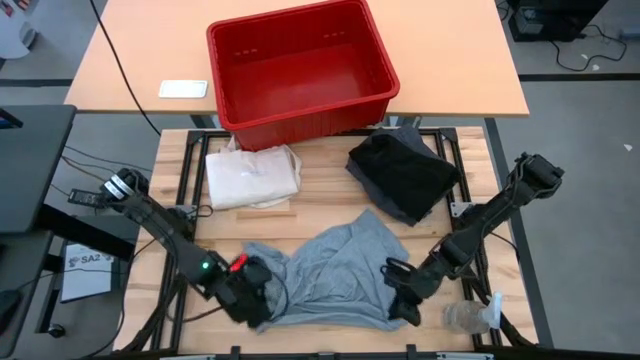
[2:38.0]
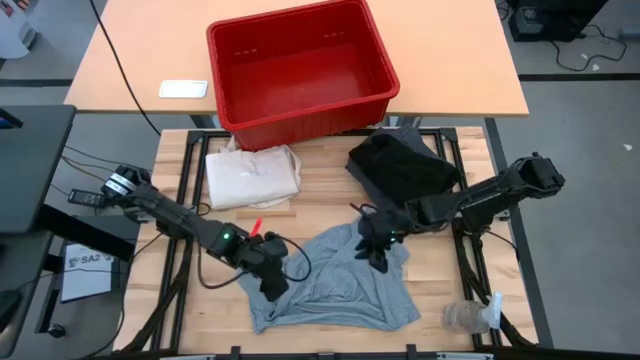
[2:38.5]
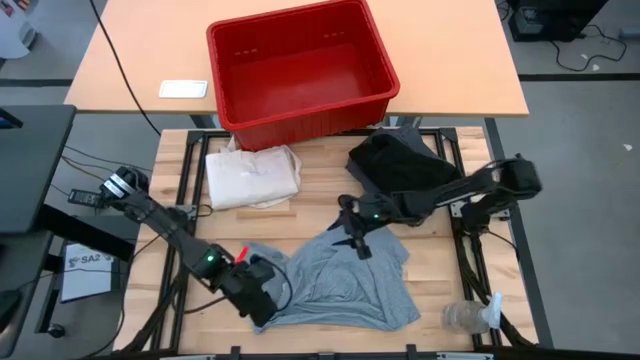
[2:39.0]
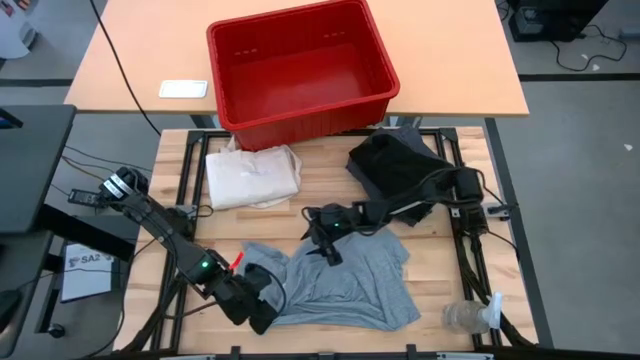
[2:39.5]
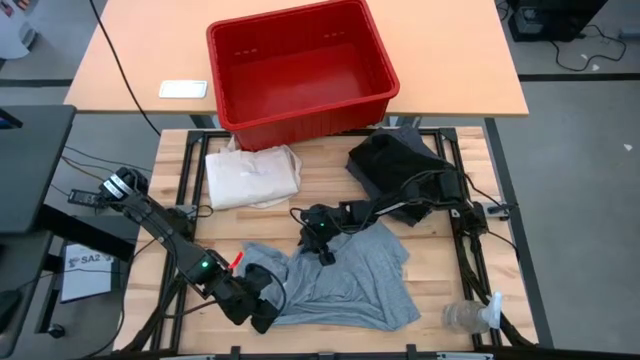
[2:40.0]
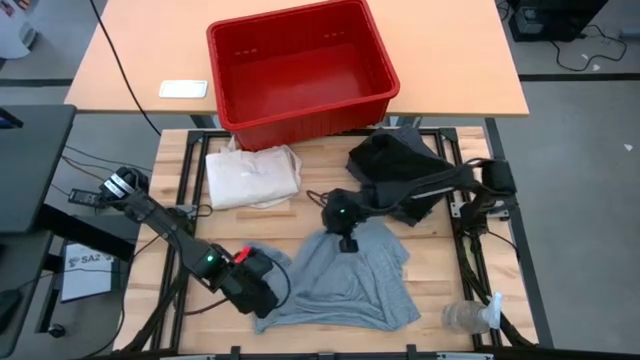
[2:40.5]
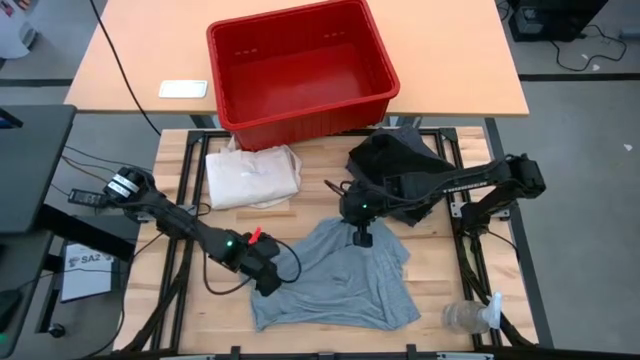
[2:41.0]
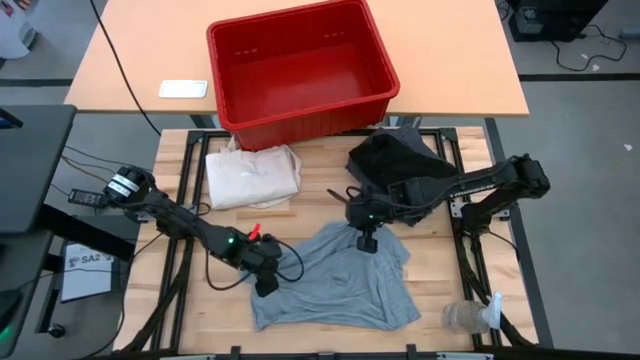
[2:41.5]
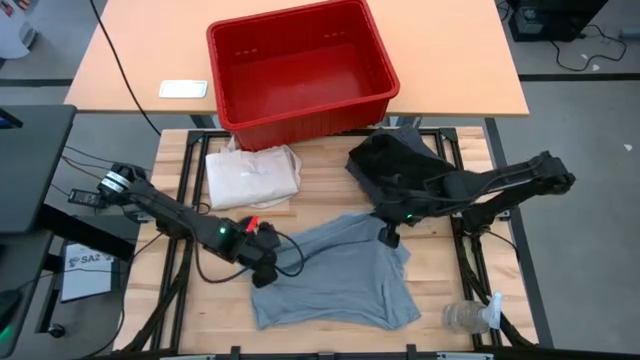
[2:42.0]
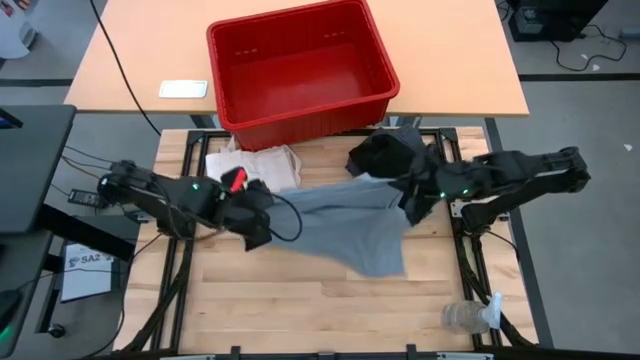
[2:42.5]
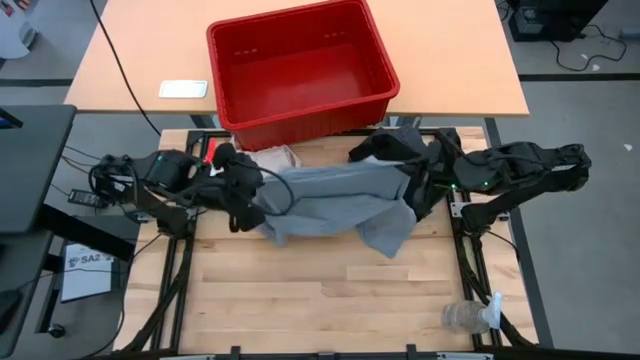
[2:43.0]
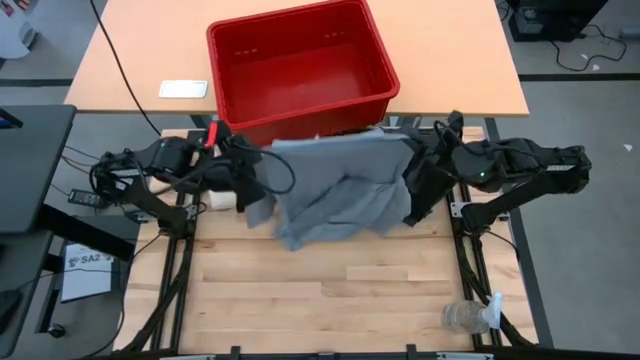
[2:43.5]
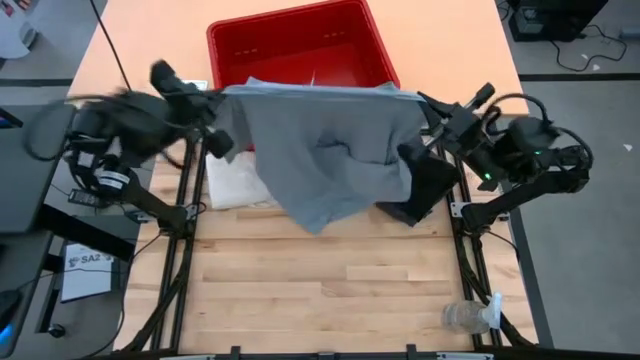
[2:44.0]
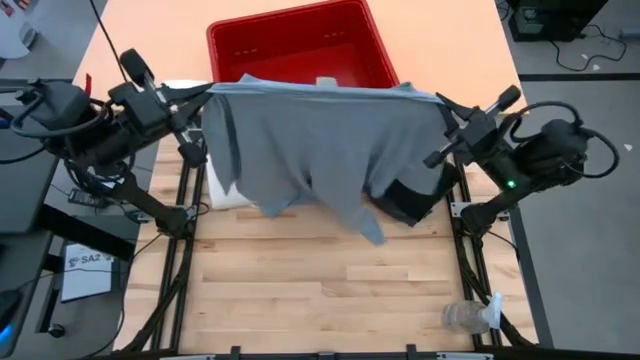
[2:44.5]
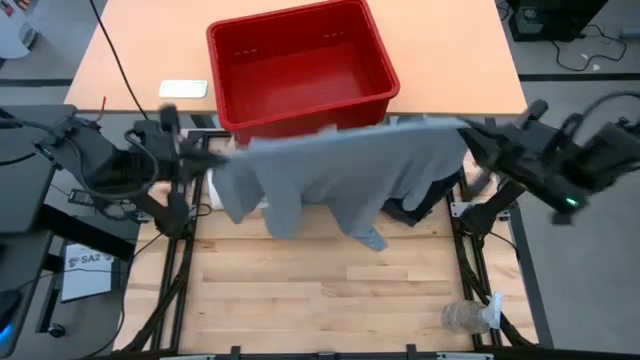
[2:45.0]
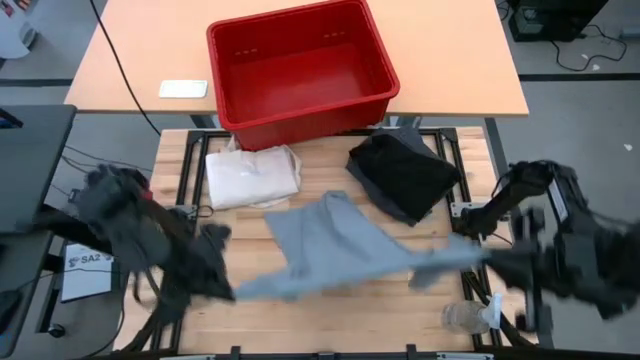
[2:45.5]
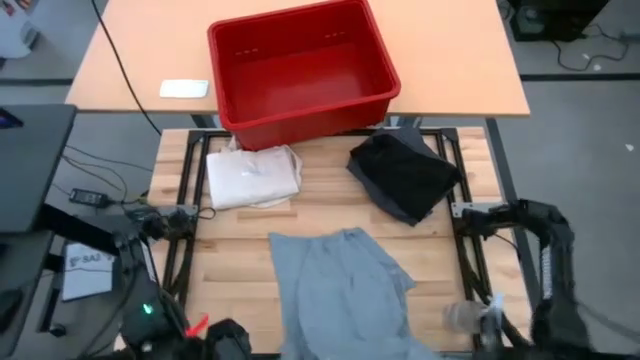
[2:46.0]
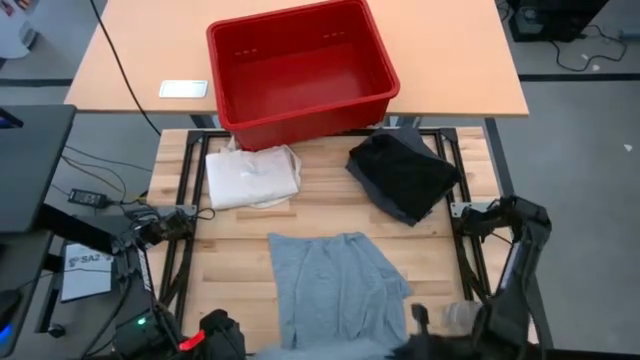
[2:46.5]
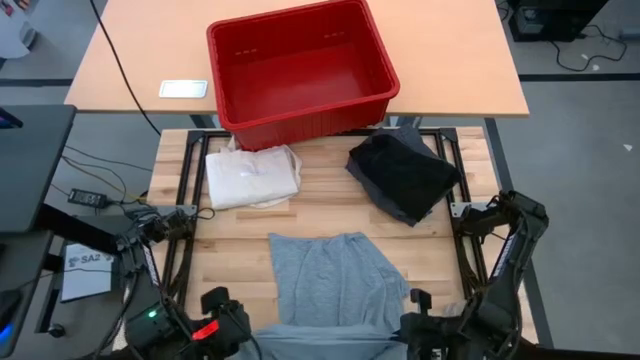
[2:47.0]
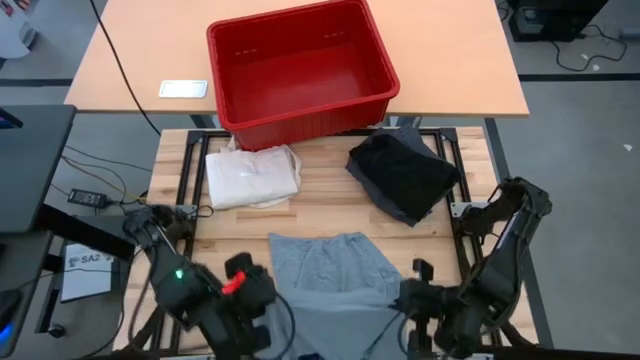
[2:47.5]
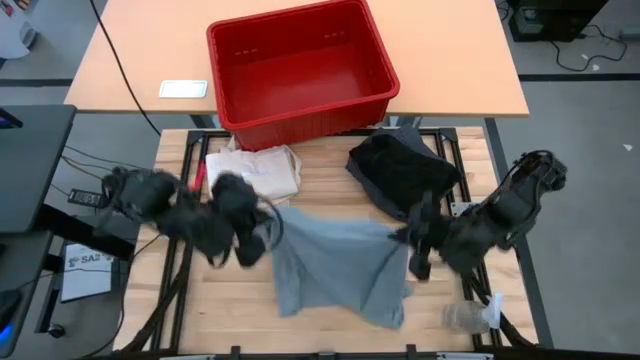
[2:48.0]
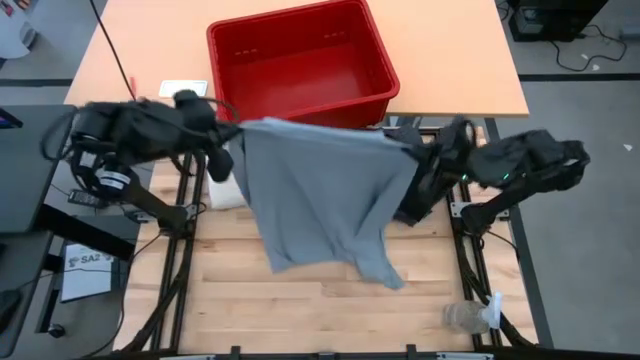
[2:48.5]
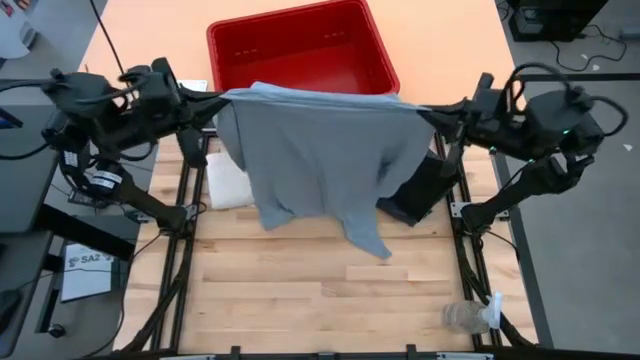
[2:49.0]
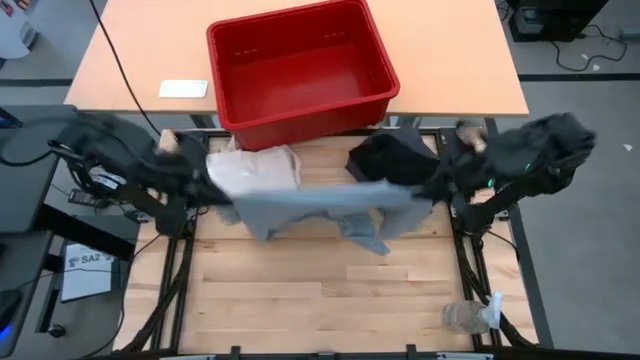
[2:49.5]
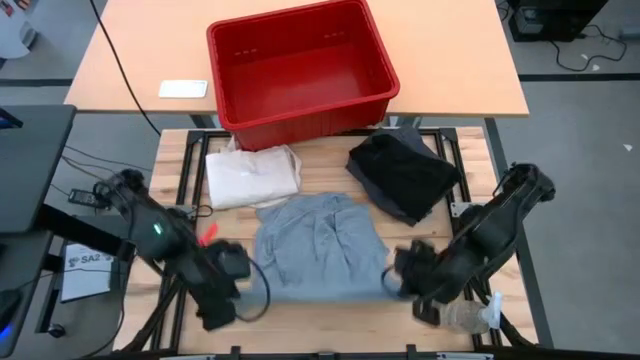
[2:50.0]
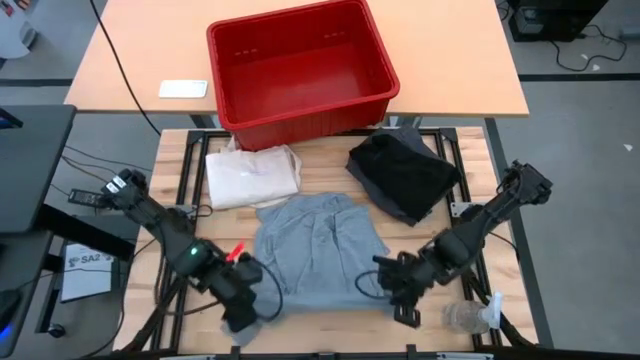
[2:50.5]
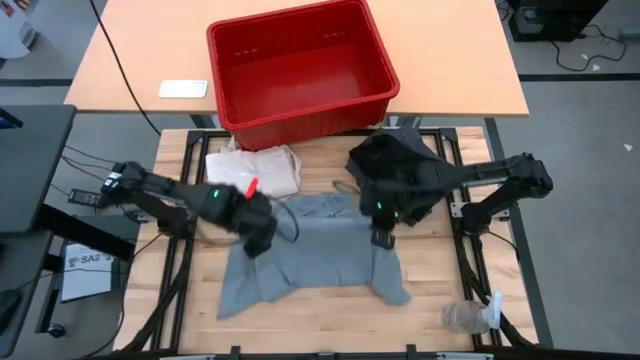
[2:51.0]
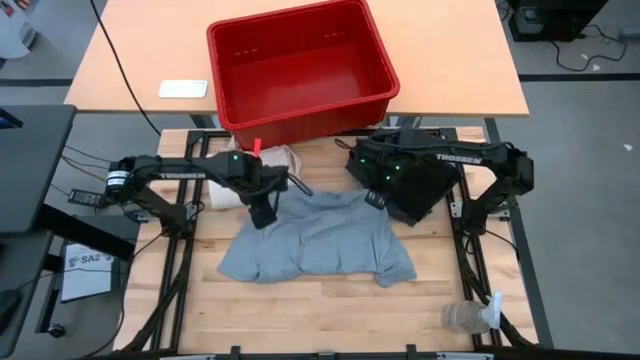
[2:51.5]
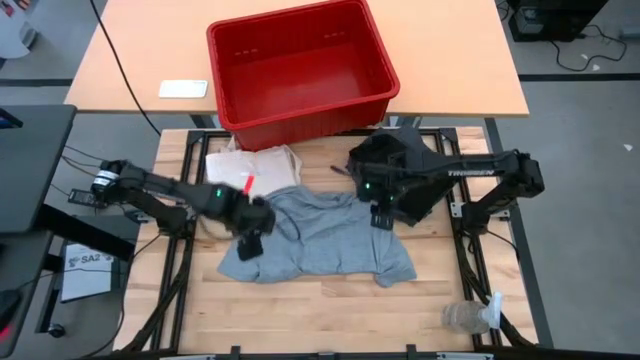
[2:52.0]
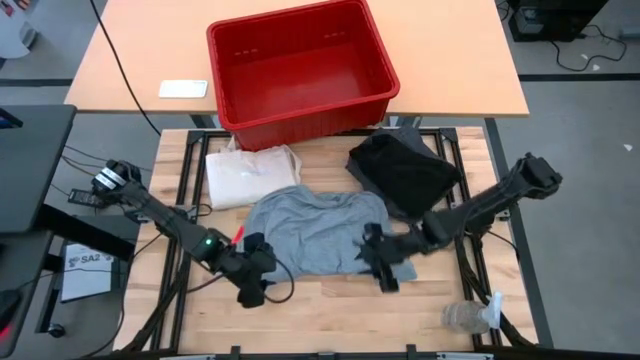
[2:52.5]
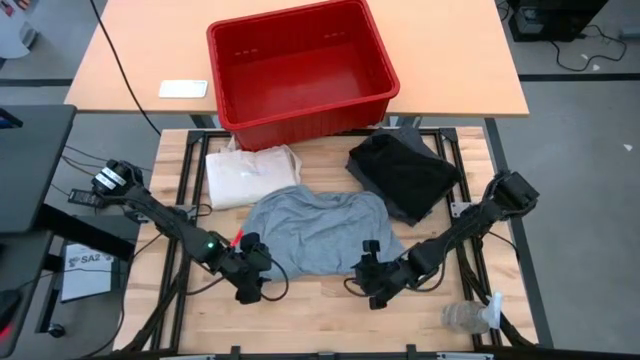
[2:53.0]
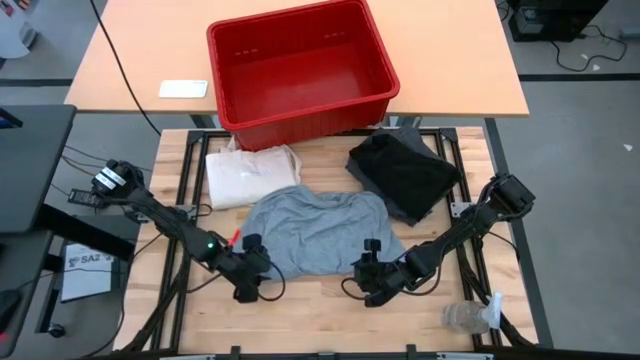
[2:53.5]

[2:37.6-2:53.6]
Task: Fold laundry
Fold the gray shirt

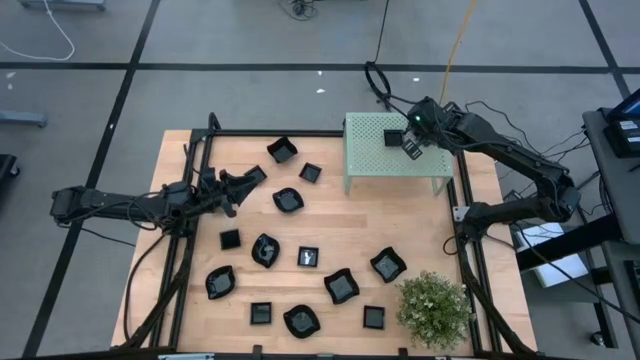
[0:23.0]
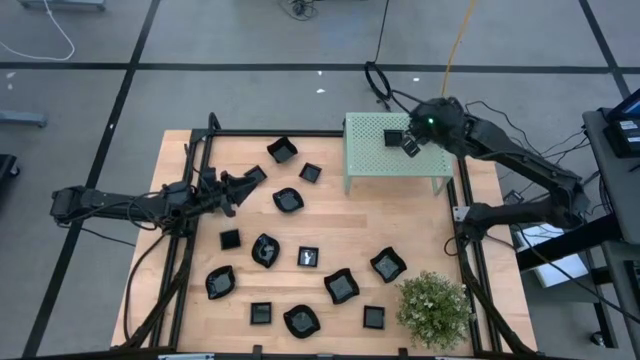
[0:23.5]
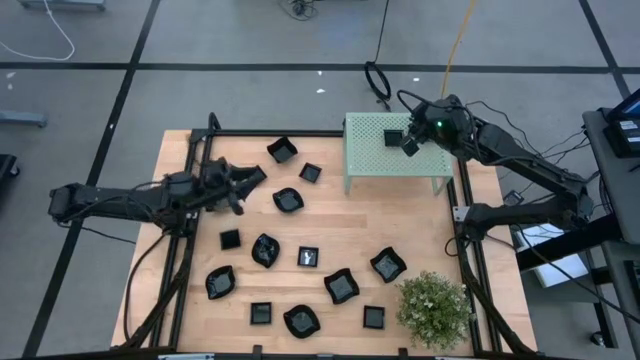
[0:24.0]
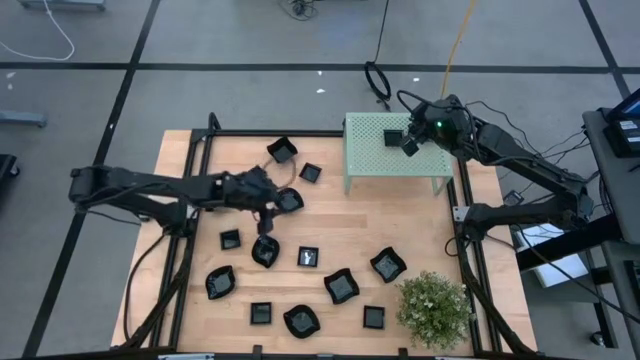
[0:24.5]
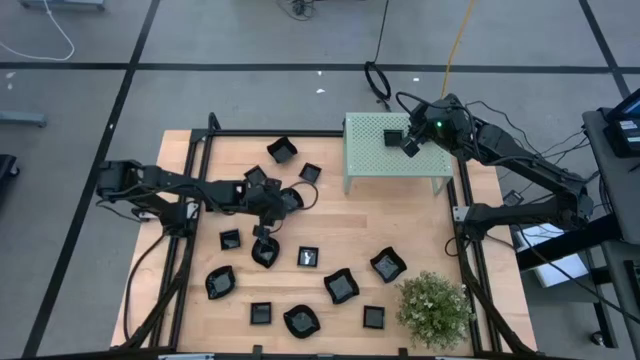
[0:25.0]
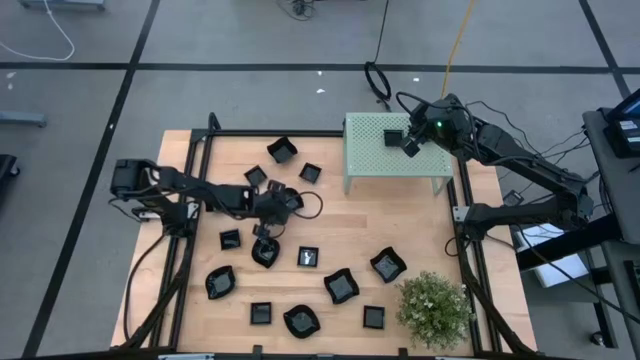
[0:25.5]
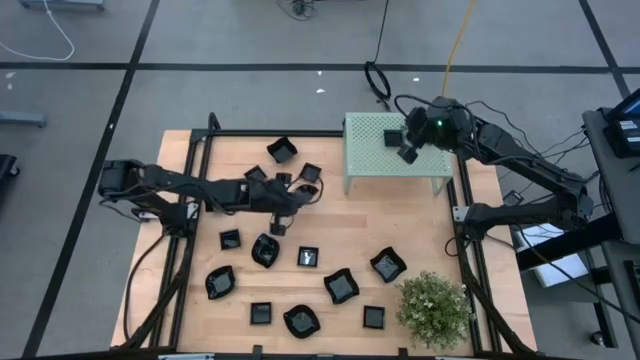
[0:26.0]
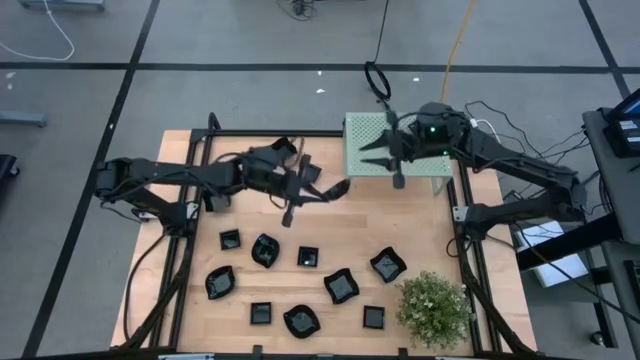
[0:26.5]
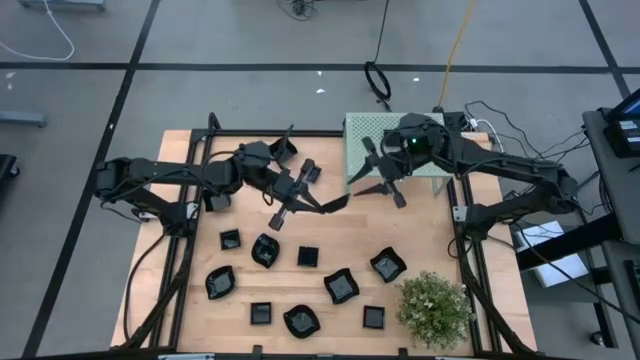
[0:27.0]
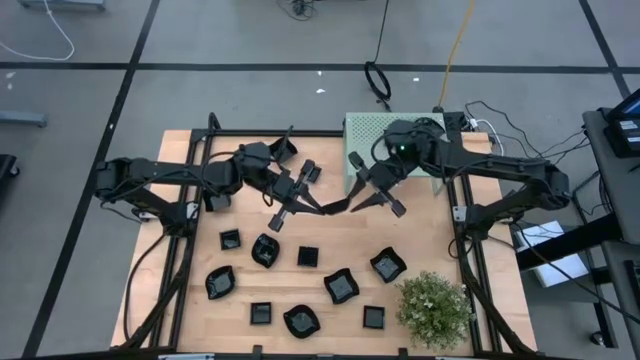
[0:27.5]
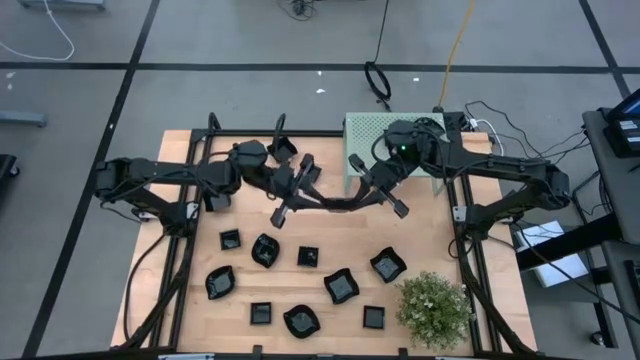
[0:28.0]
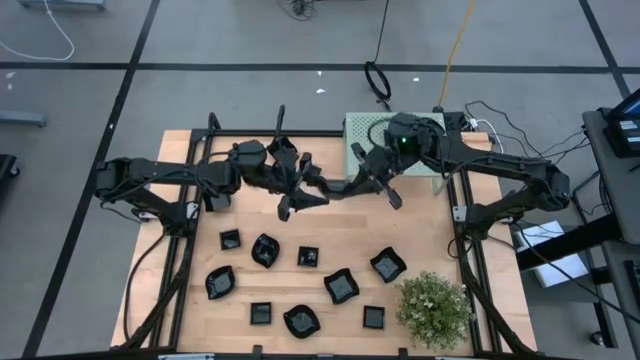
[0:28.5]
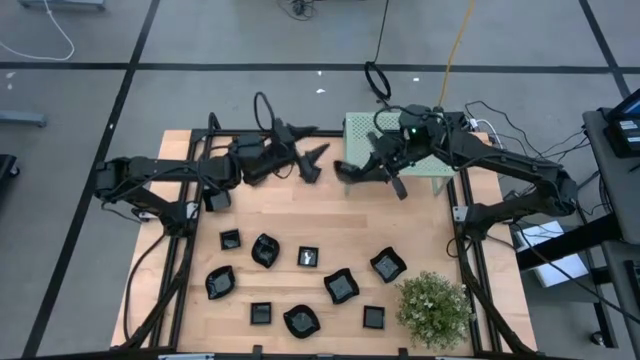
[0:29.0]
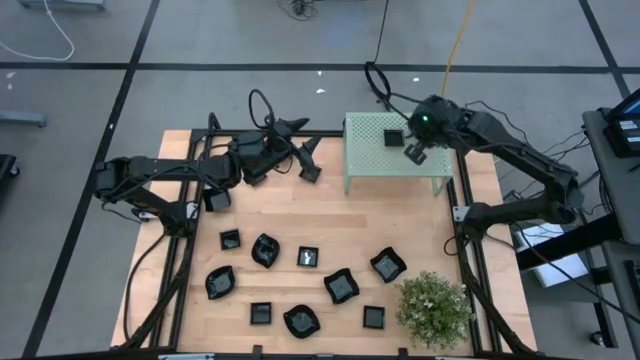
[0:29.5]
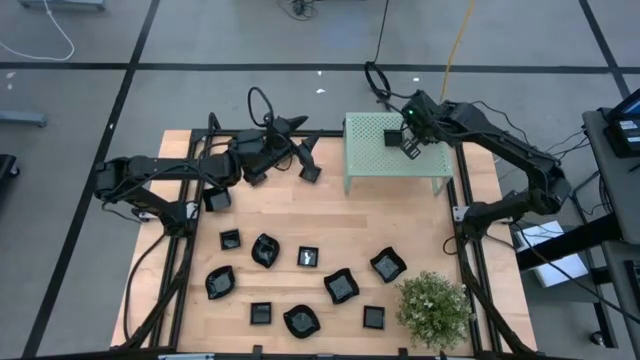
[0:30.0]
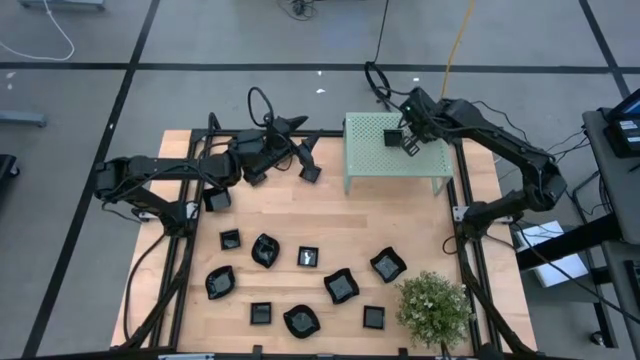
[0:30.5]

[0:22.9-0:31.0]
Task: Pick & Place Mini shaped plates
Stack the black leaf-shaped plate on top of the leaf-shaped plate on the shelf
